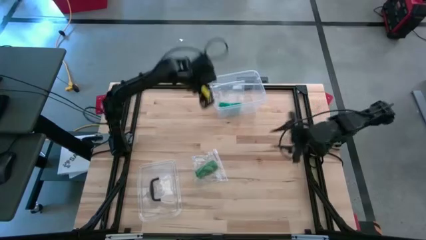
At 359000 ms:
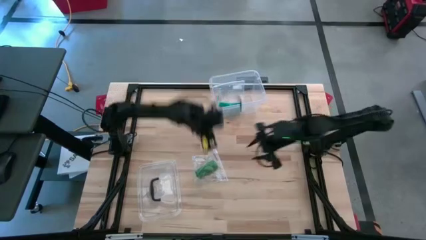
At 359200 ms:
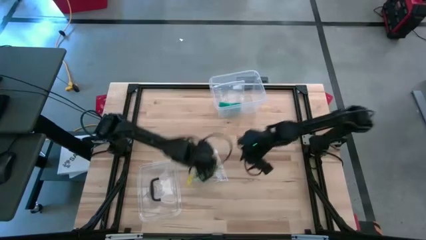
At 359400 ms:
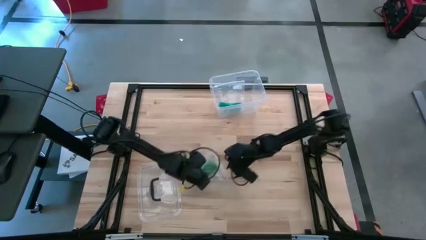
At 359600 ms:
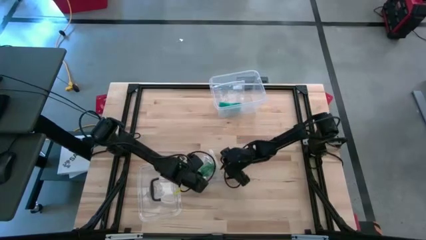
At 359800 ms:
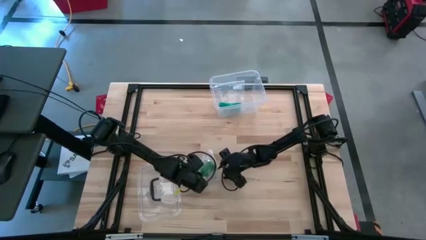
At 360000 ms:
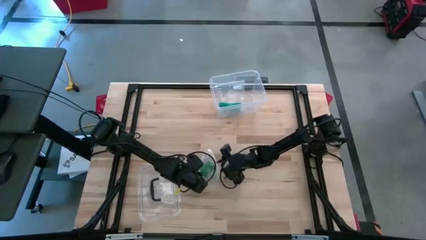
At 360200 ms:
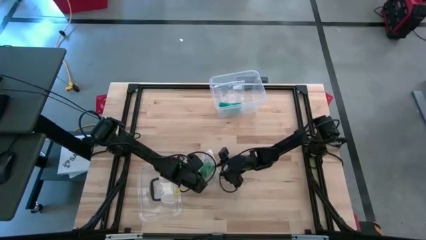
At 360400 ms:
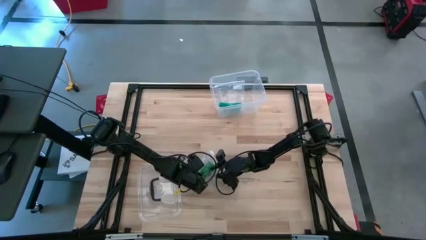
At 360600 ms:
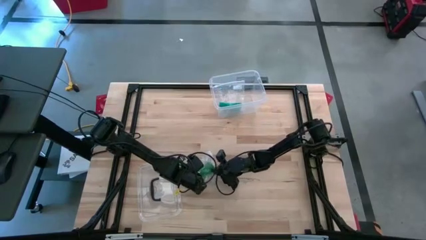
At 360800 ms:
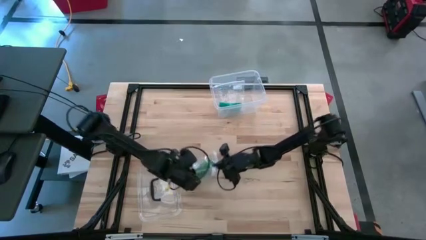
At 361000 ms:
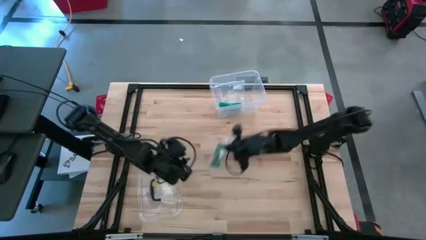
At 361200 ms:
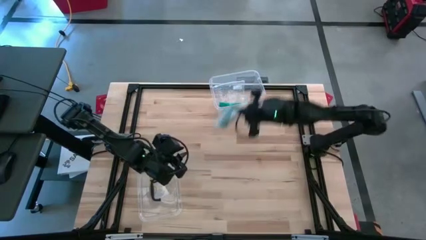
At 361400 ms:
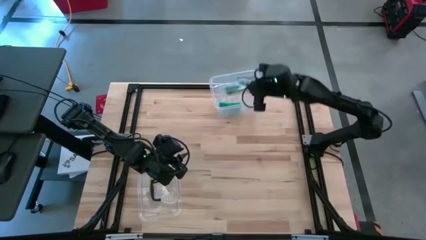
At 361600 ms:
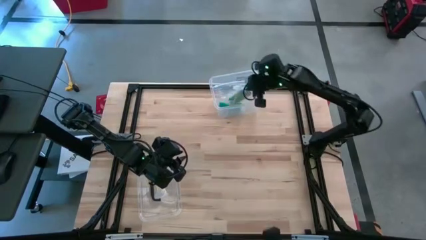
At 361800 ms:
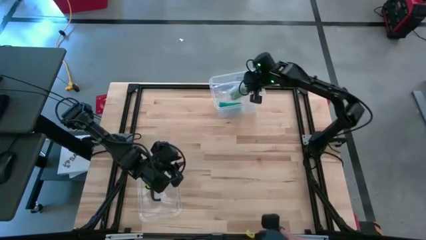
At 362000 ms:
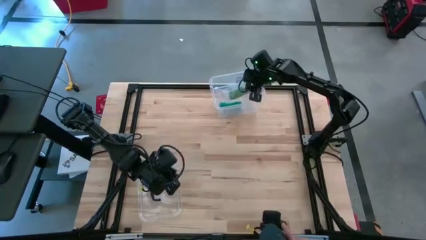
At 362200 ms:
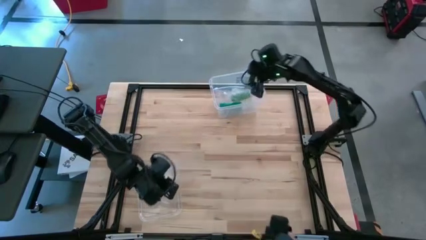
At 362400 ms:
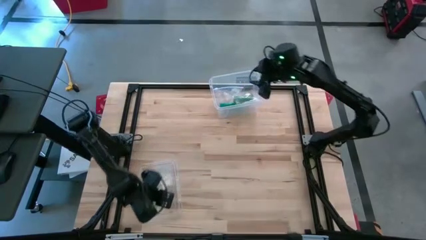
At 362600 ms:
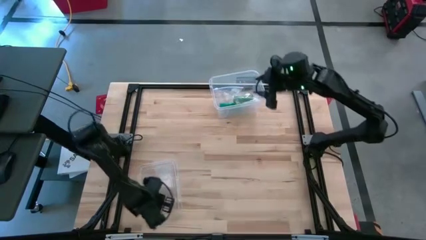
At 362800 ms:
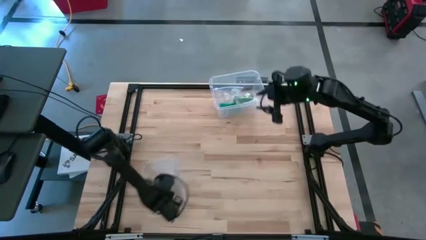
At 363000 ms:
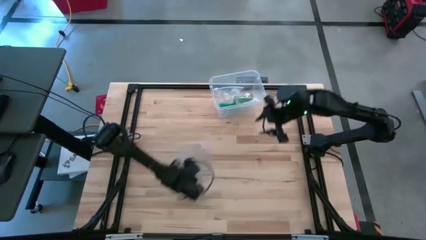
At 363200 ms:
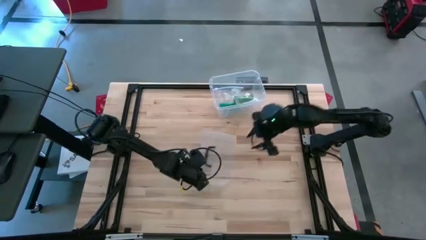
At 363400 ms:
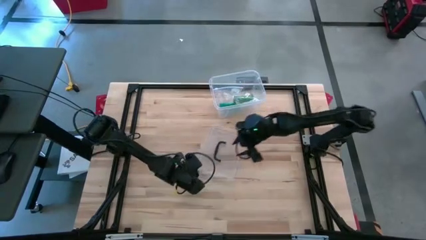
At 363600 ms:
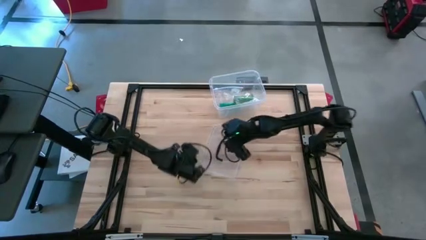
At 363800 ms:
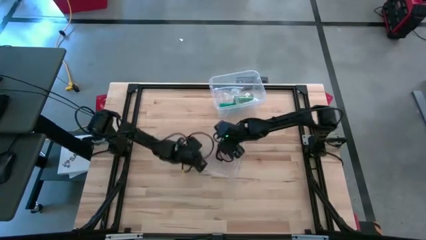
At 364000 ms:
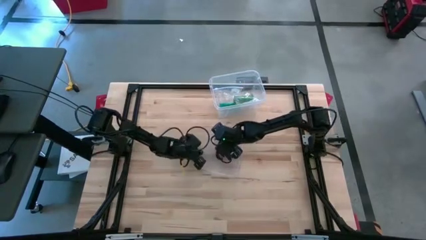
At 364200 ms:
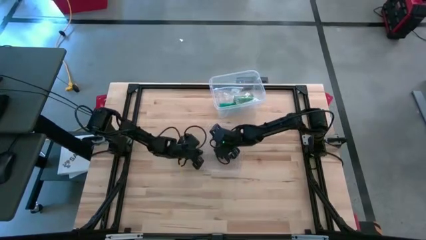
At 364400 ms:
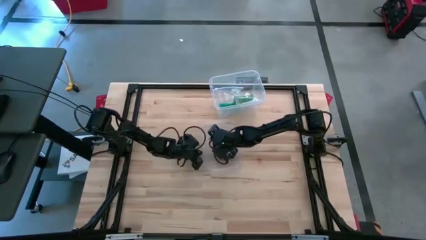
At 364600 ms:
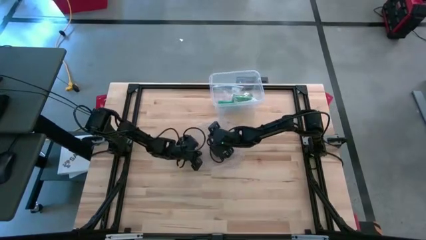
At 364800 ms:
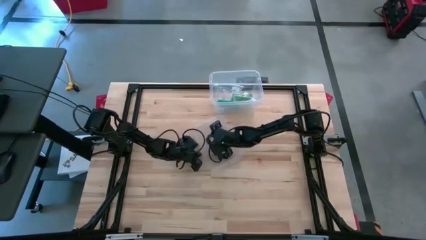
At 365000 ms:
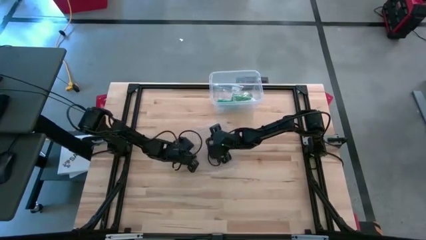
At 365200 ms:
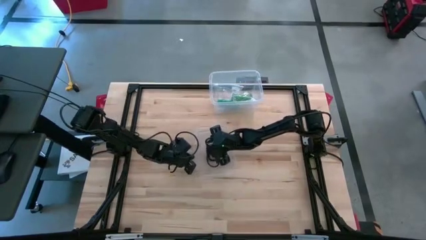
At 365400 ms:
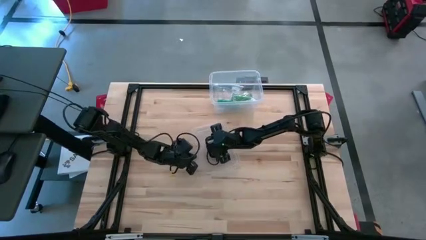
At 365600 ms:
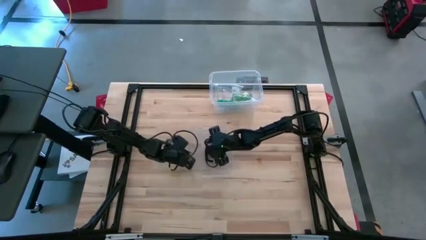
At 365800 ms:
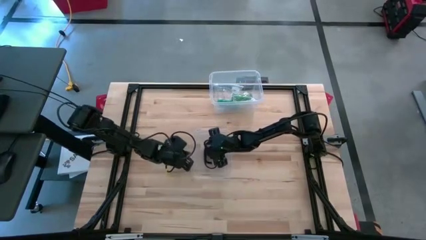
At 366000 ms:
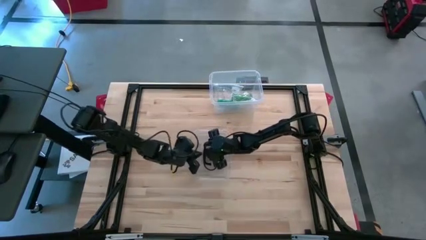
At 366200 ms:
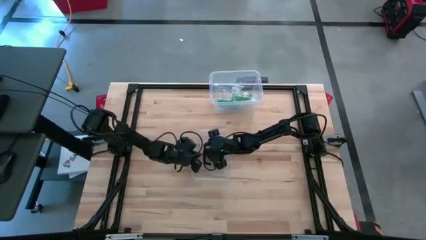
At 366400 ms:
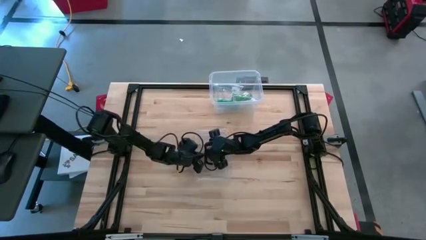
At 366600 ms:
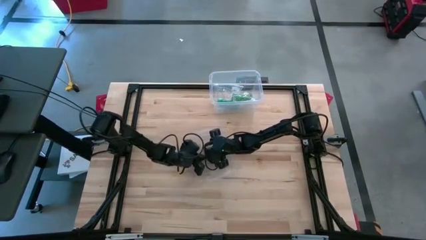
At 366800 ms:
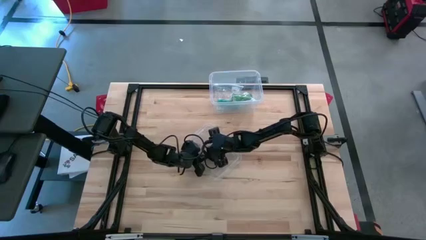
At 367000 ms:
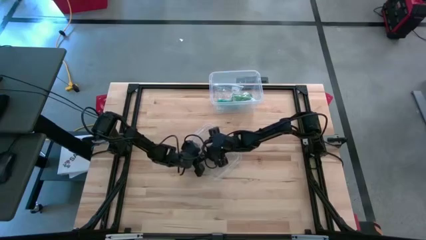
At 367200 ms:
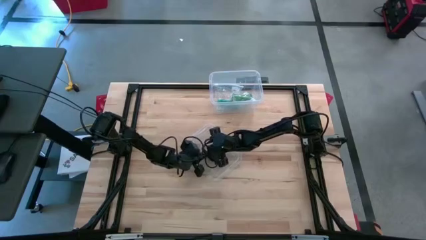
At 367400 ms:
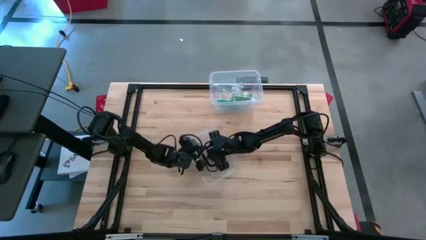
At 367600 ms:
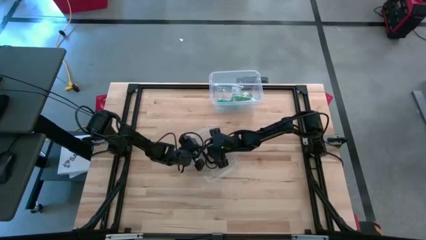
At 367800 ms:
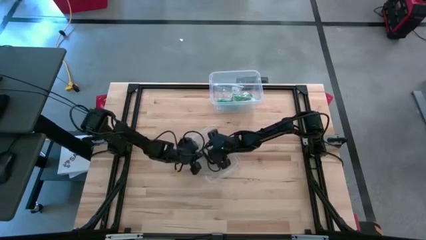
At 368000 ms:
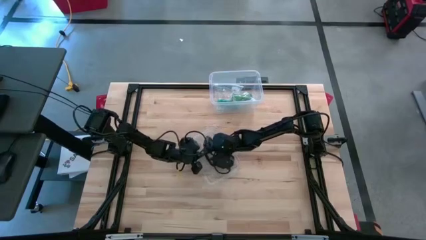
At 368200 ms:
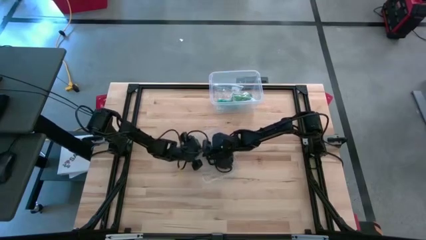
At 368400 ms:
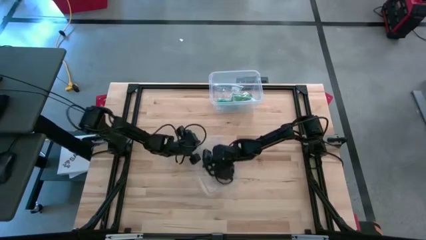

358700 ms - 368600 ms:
Task: Roll bandage
Close the transparent container

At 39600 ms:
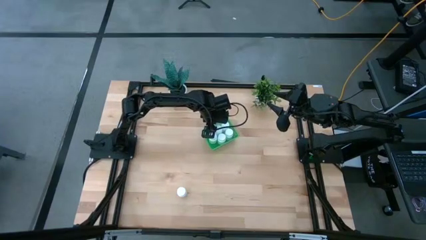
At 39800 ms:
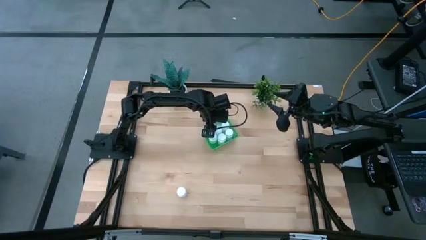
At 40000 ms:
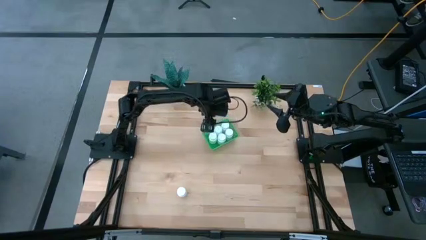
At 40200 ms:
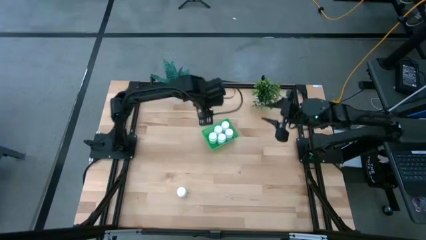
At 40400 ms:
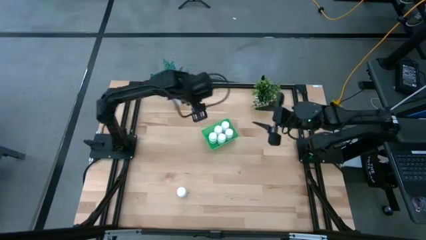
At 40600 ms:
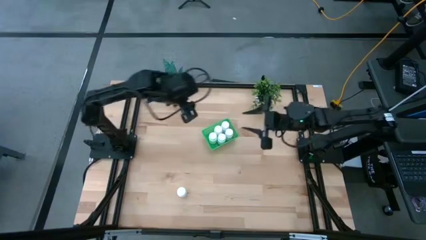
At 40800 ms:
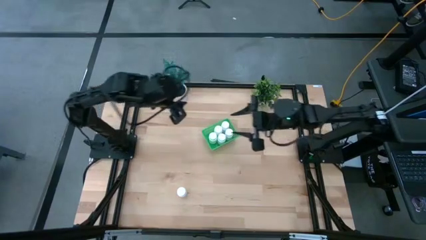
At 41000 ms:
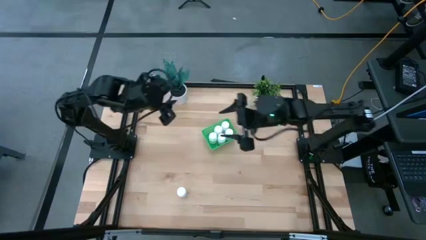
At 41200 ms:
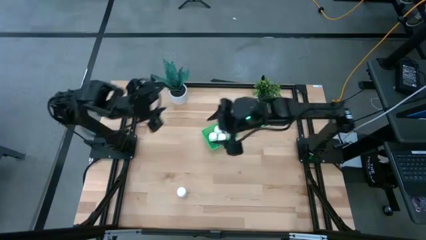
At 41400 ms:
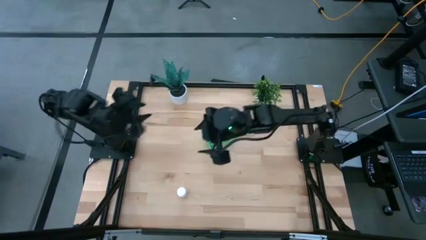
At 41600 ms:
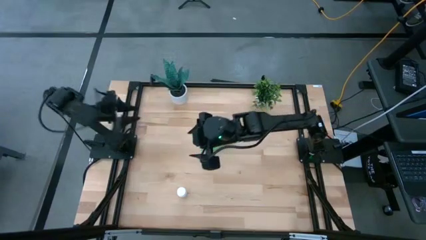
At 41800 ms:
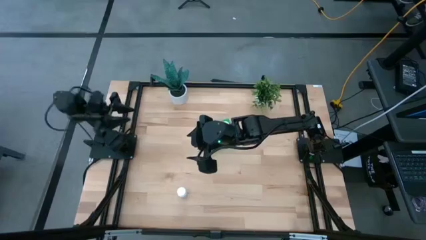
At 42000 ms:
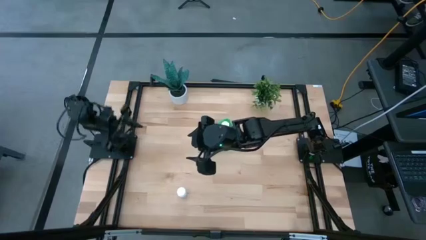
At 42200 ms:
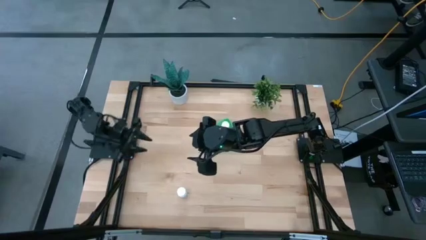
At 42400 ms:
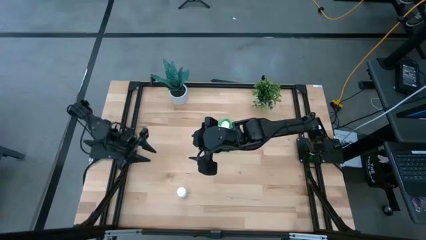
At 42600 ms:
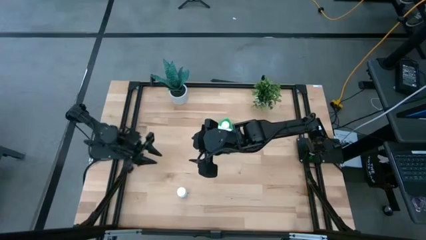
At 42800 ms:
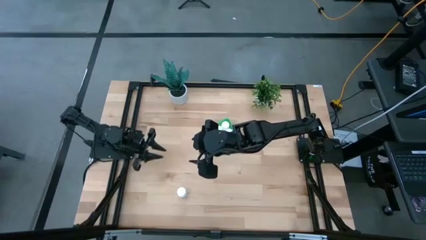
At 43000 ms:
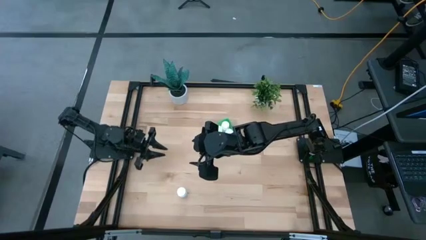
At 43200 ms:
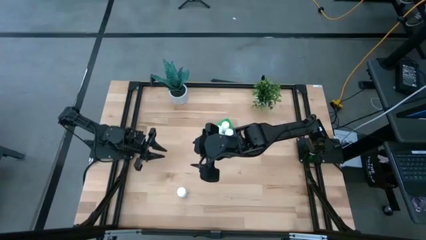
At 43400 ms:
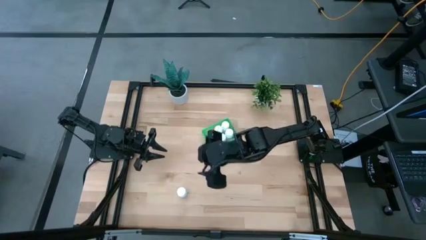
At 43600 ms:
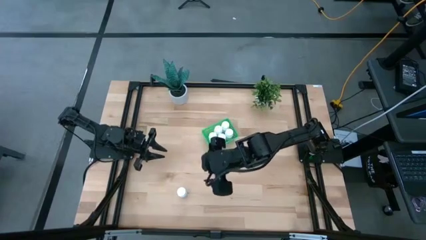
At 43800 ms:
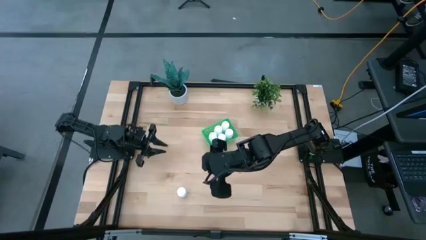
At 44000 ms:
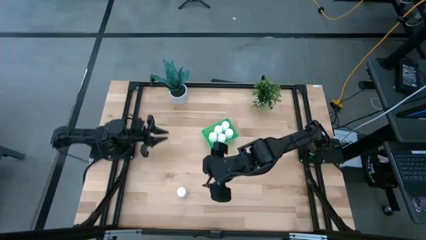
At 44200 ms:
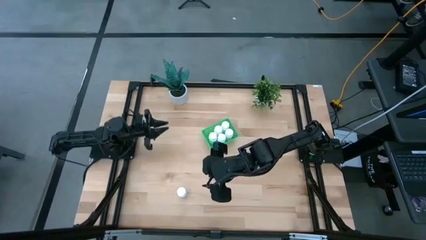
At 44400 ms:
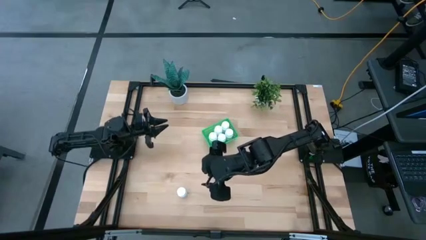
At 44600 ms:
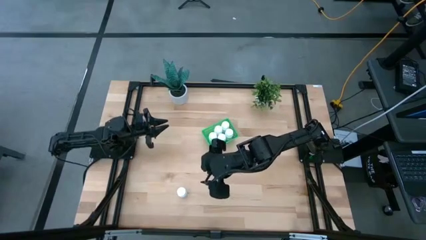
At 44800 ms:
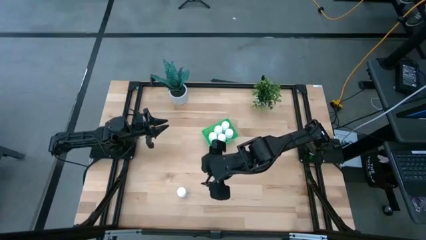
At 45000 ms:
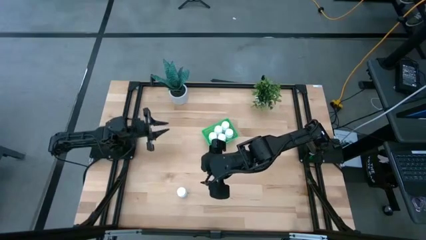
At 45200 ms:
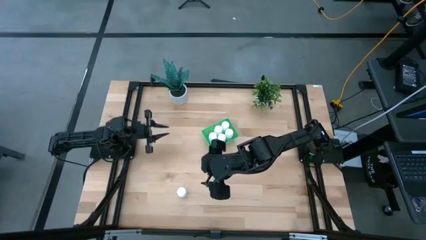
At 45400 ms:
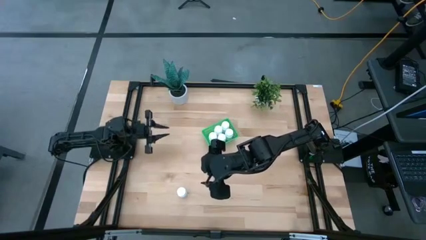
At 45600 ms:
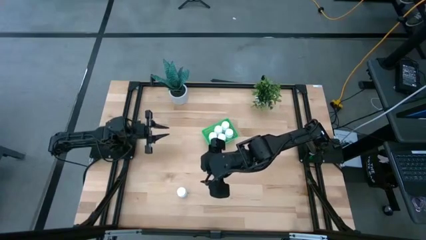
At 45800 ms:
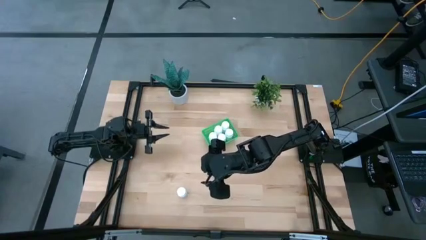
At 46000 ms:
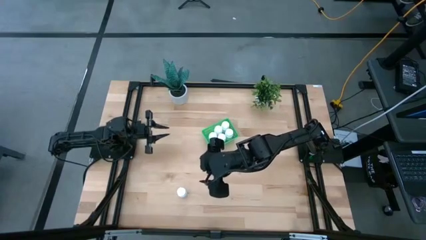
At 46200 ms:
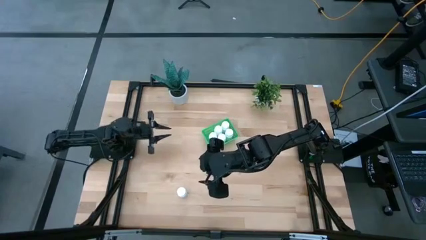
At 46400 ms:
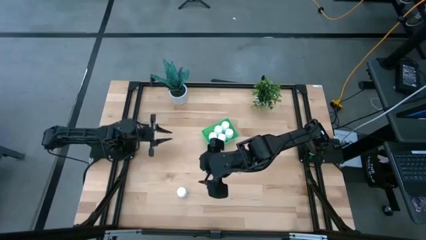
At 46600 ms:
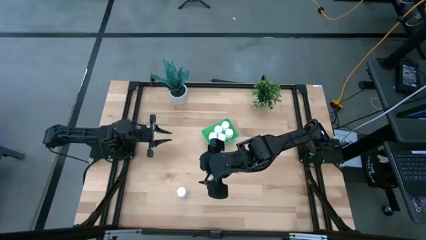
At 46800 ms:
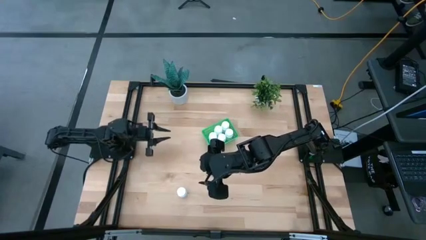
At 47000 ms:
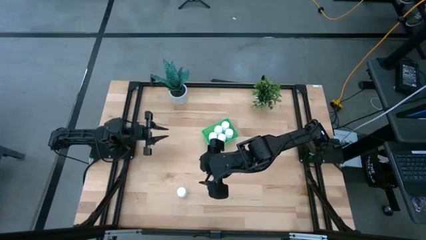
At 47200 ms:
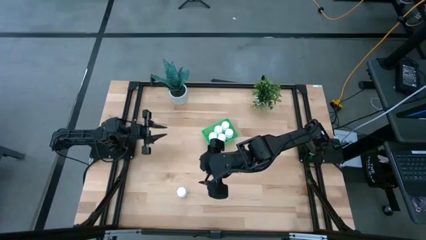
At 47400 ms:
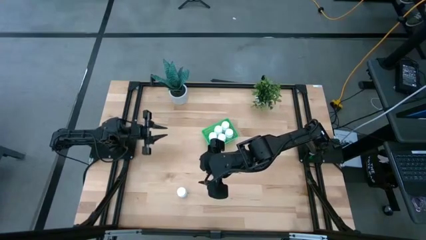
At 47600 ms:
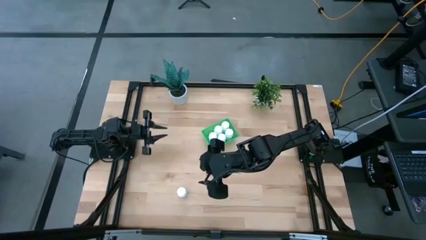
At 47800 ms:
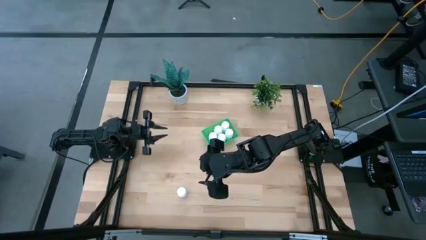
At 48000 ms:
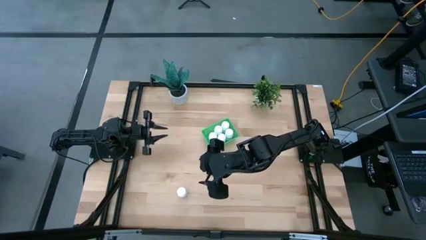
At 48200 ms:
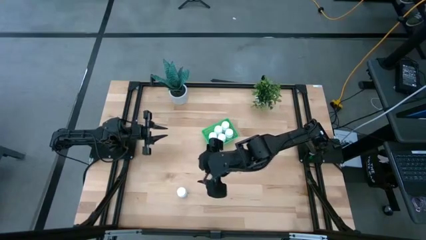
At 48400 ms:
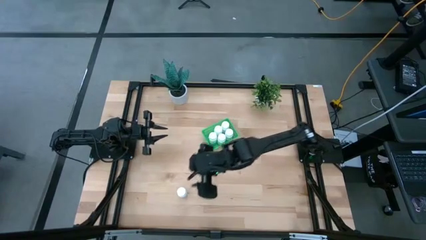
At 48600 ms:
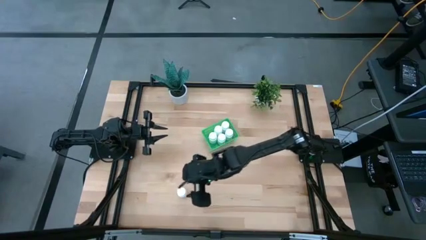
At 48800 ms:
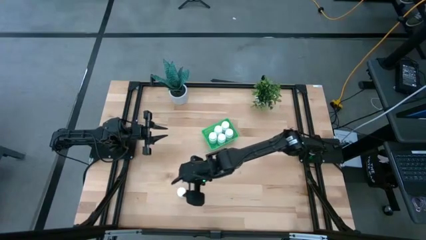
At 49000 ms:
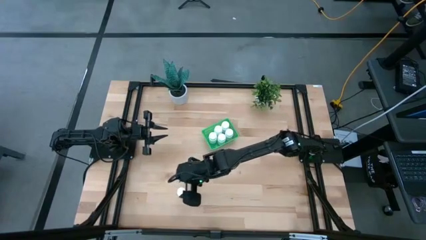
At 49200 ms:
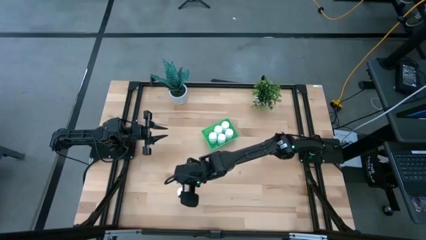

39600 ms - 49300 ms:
Task: Pick and place pill bottles into a basket
Put the white pill bottle into the green basket
